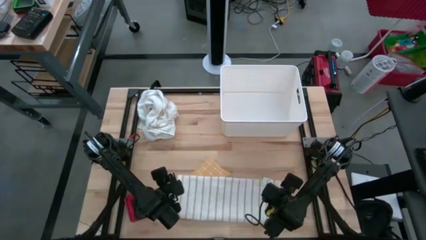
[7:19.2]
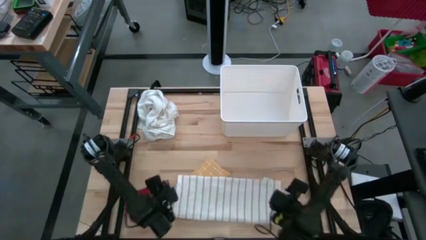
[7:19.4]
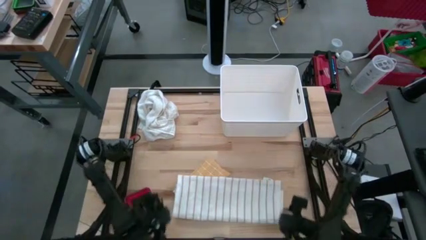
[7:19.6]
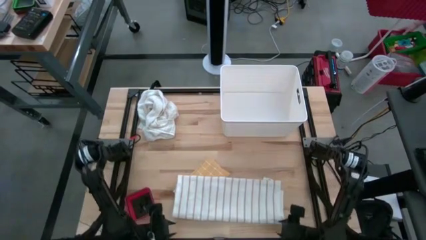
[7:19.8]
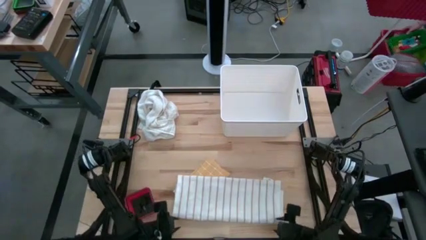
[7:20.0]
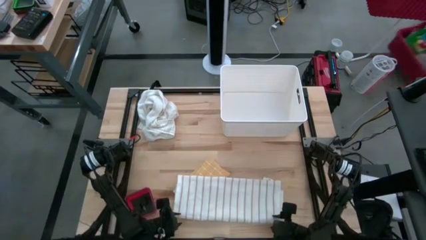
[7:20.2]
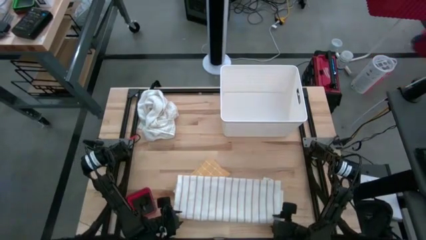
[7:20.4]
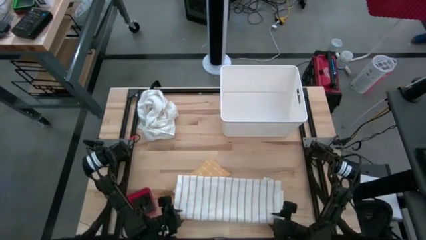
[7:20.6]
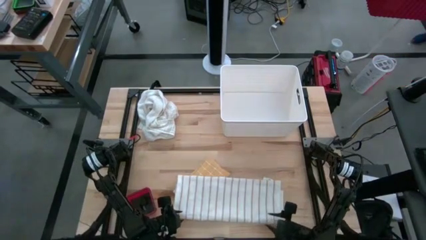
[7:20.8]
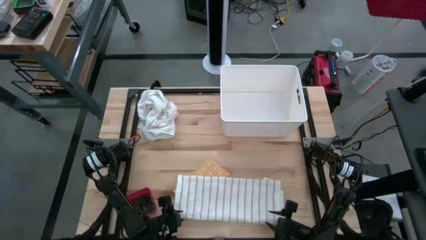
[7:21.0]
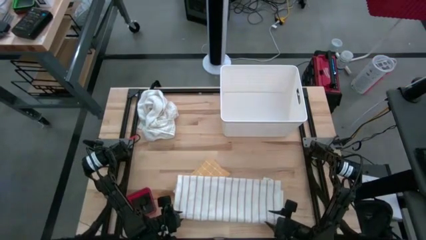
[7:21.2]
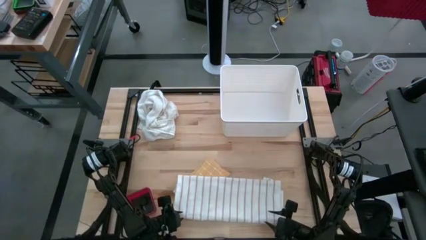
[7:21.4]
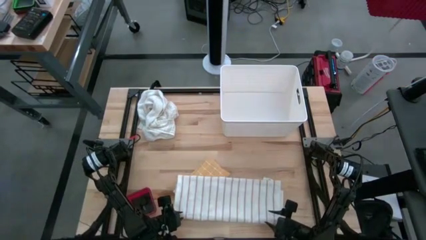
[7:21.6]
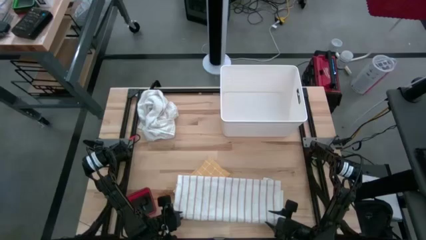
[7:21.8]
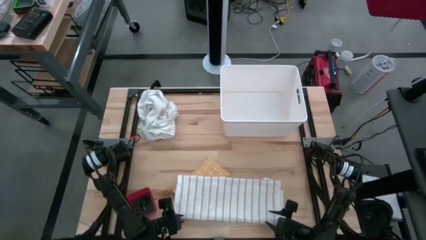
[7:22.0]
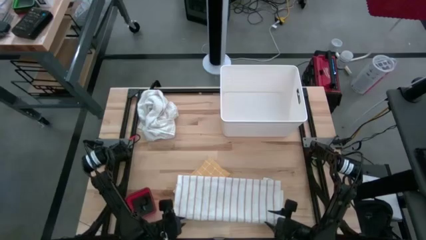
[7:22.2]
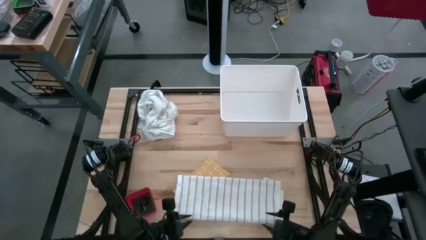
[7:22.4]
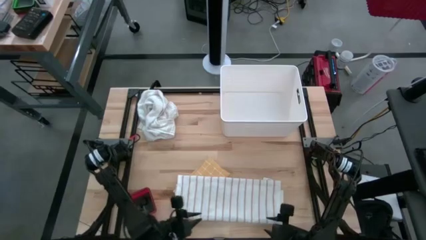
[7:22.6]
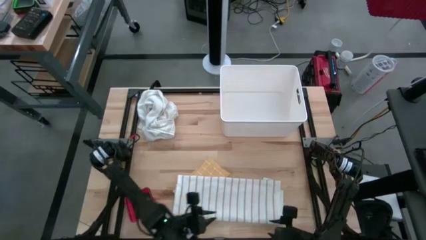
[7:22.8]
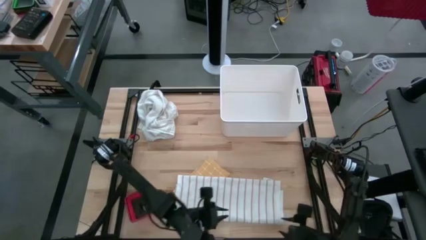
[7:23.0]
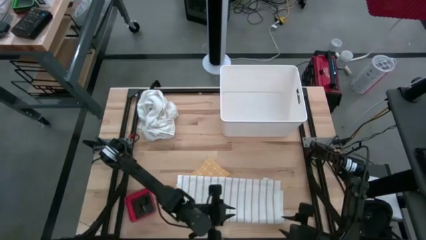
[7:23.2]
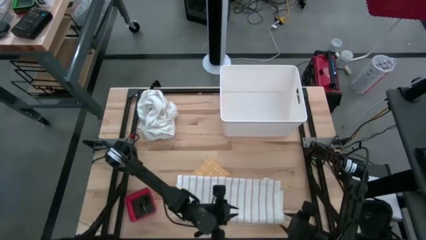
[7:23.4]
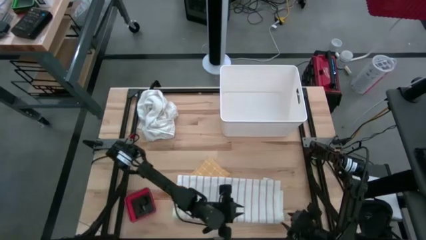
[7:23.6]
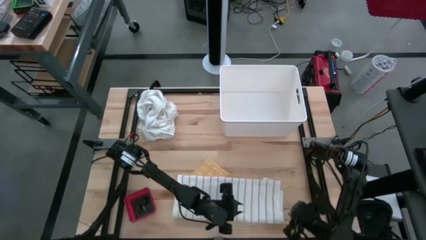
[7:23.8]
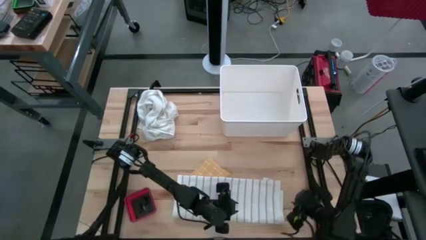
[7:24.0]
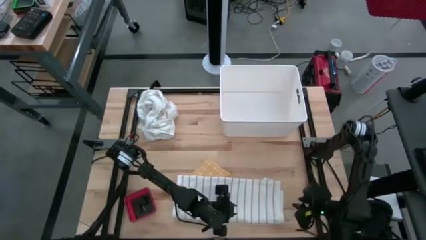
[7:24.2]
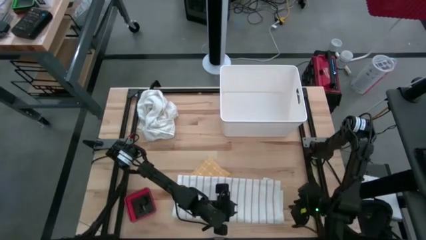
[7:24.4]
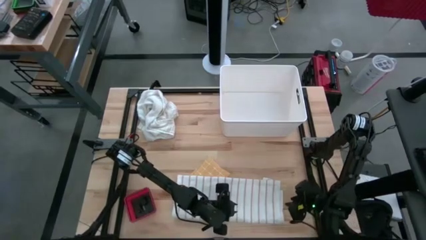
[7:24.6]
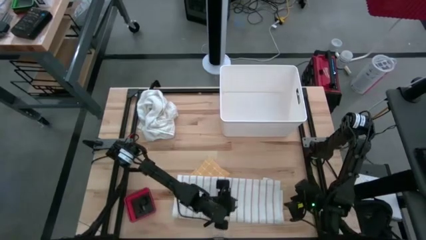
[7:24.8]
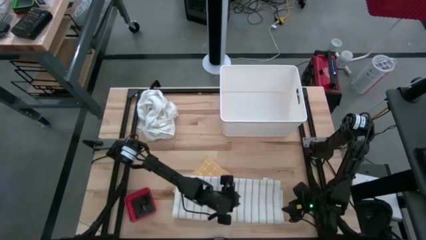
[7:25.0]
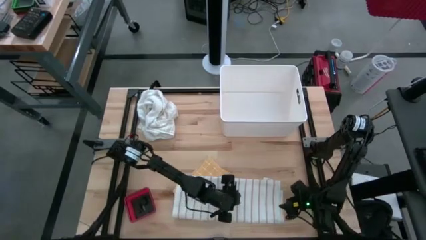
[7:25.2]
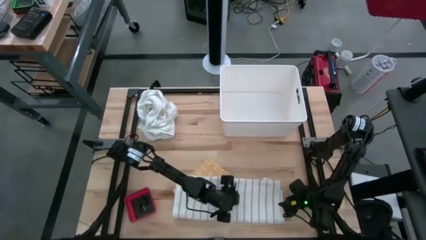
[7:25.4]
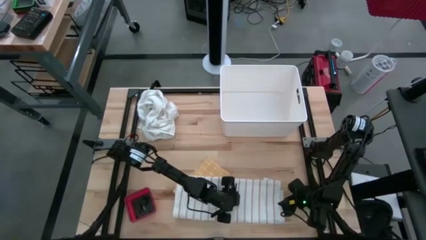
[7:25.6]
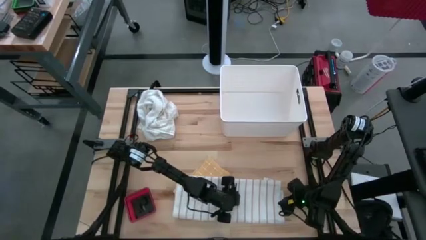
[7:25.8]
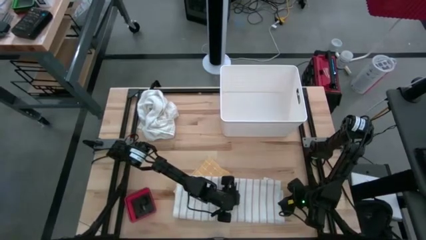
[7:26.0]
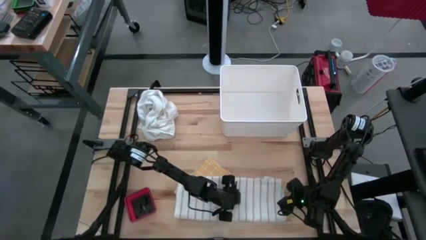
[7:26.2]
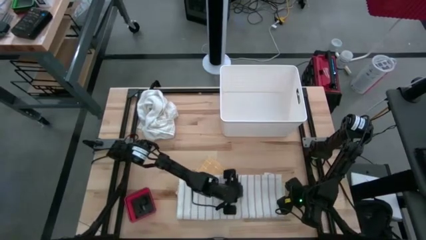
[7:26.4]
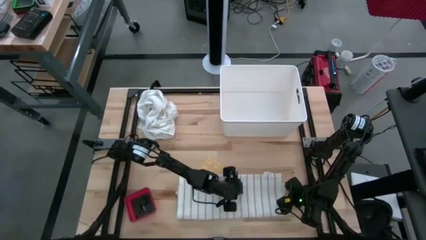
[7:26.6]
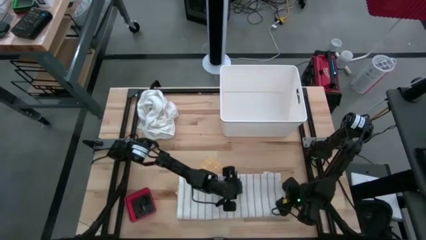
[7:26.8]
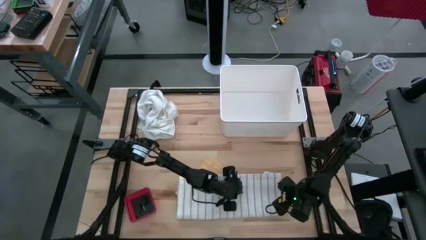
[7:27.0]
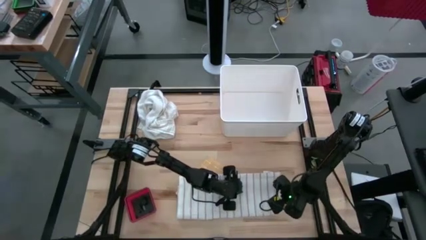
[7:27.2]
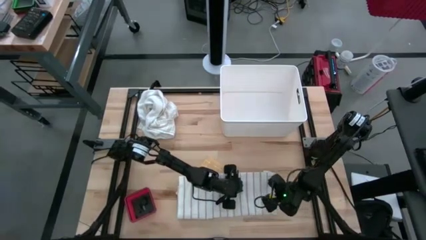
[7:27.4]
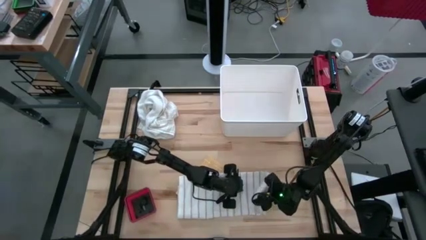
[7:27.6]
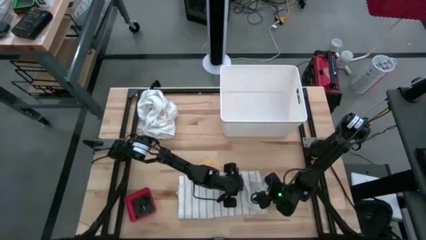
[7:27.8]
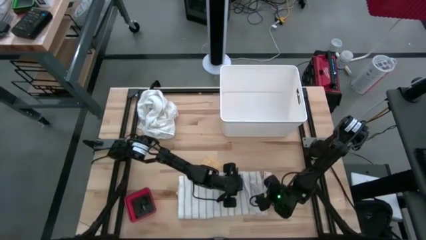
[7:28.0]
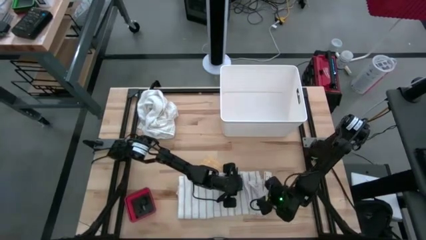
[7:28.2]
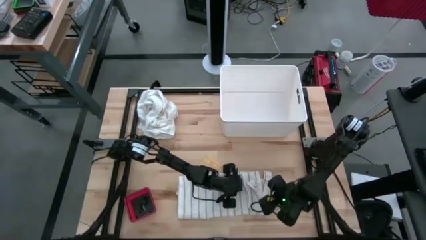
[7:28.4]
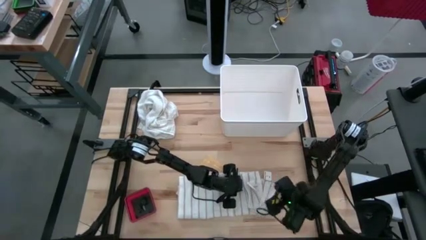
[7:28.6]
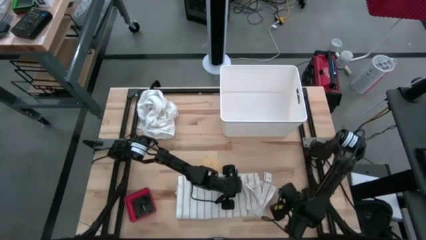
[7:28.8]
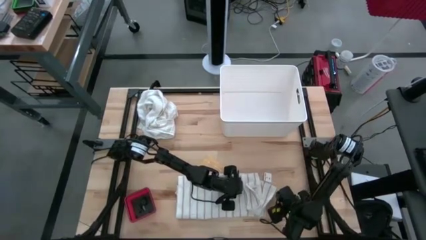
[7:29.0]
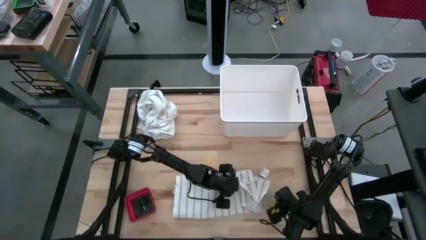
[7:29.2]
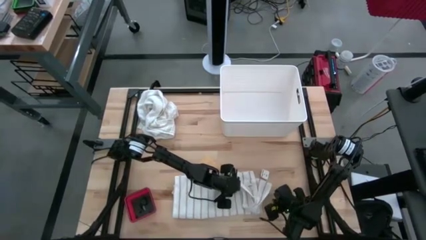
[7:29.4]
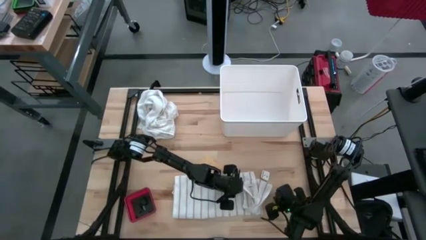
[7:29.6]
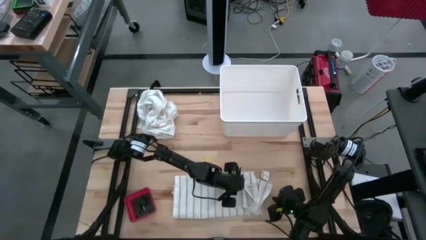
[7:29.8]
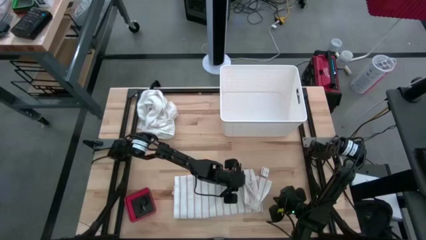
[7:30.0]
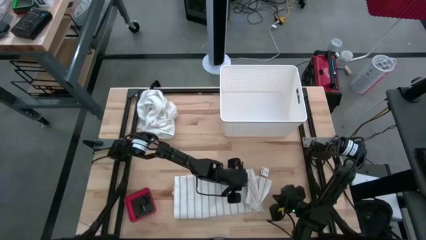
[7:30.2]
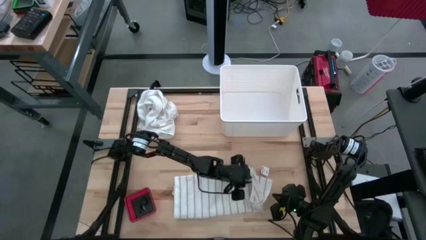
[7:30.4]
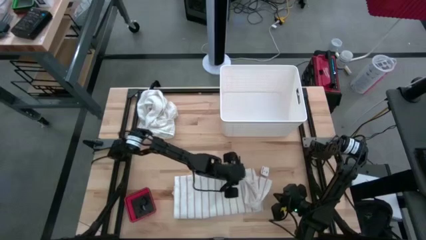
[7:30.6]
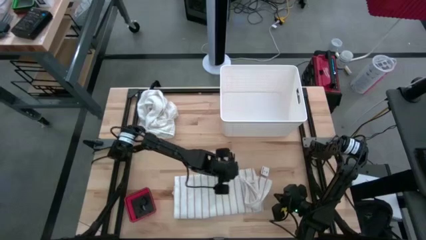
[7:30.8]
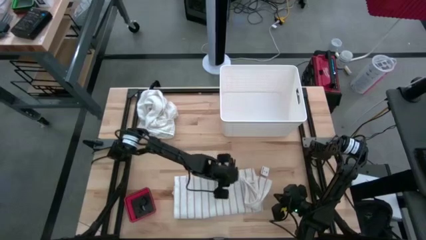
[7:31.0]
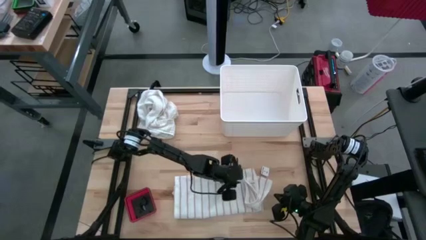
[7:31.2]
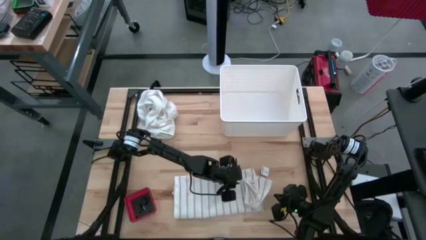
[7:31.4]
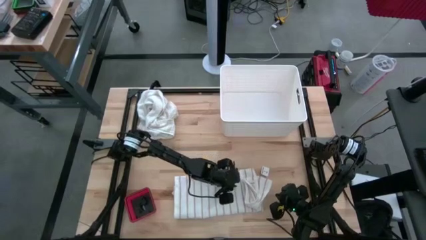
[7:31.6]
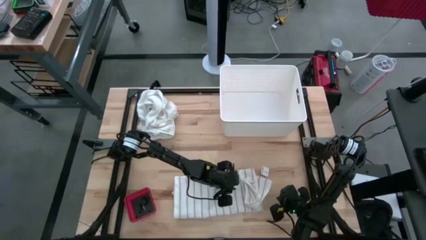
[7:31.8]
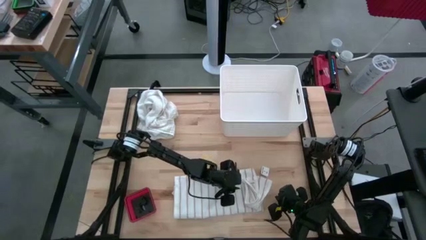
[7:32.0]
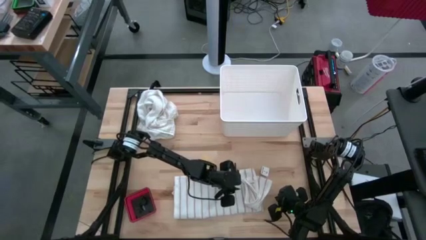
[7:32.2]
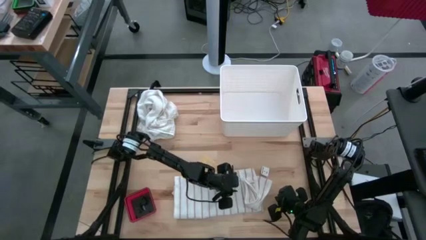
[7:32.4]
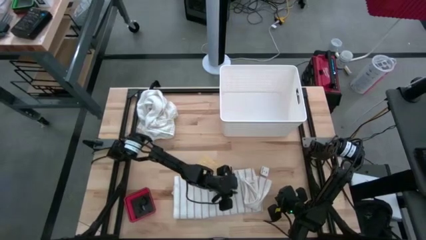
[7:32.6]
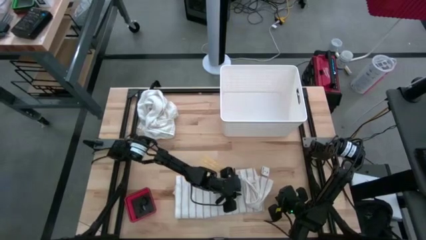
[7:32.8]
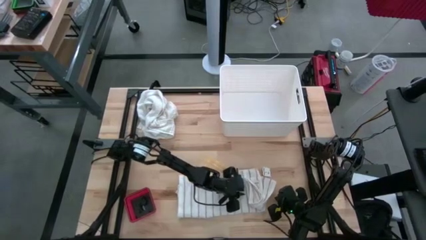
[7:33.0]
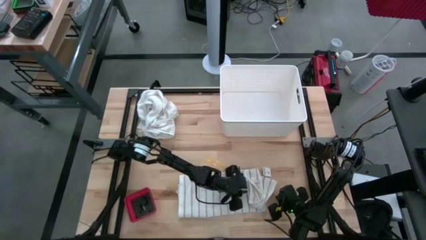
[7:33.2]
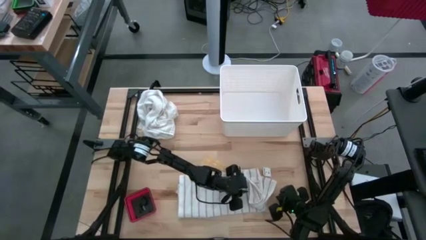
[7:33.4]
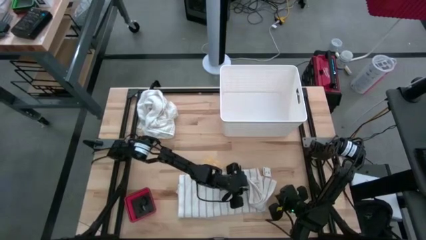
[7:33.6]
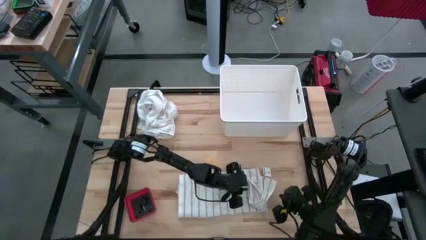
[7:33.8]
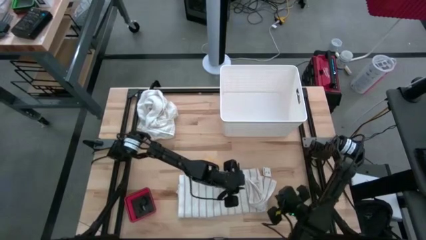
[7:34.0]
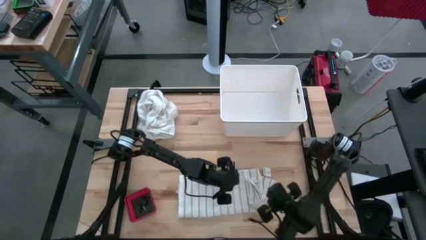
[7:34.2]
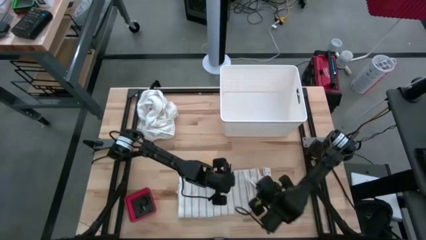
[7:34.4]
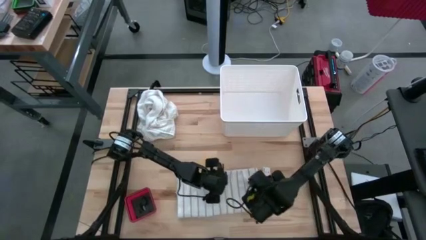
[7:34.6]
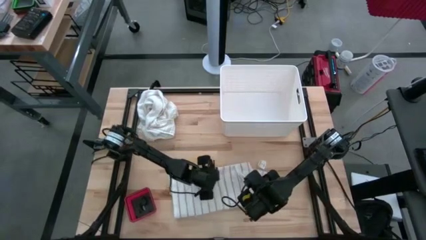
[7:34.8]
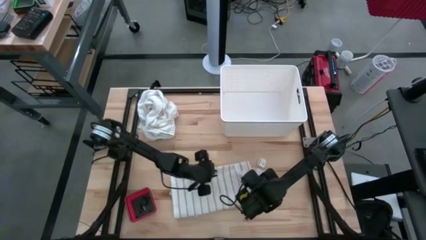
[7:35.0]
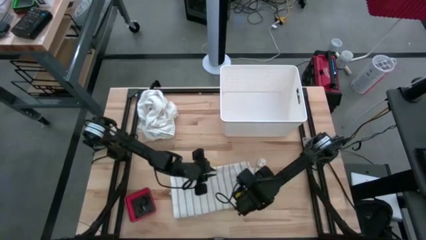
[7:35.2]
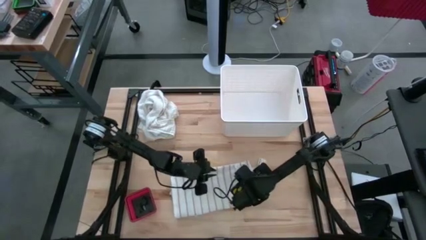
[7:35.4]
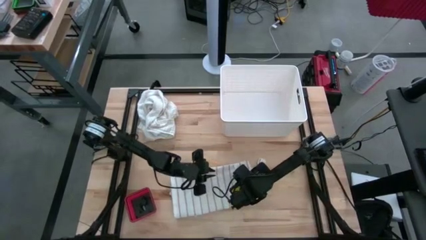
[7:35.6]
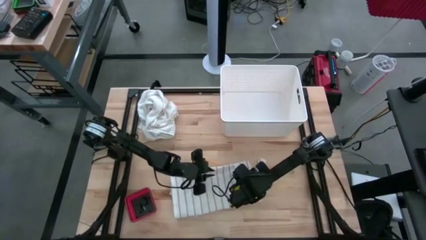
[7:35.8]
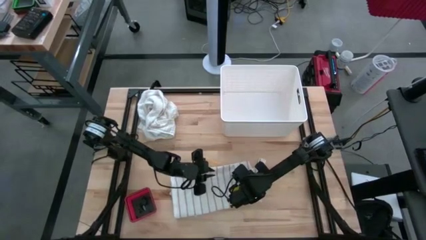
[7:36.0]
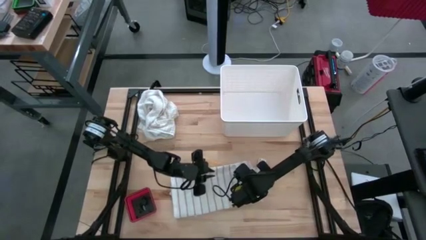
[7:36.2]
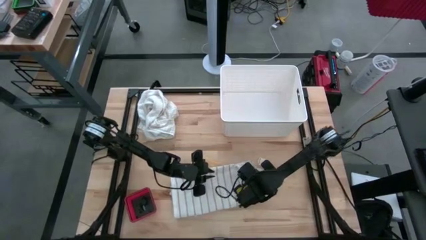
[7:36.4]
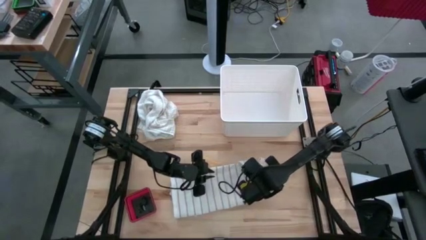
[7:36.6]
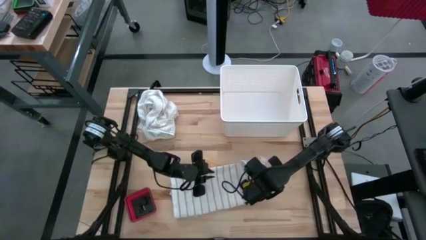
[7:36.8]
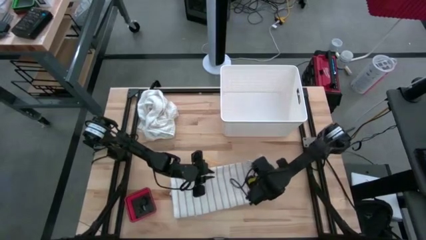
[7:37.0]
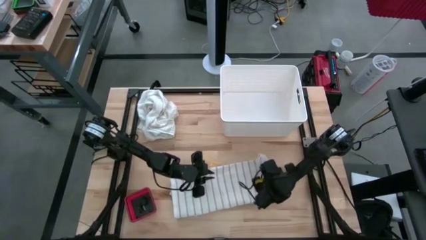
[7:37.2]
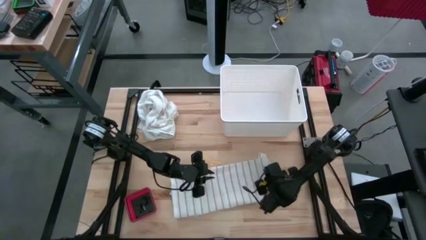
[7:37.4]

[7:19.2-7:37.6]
Task: Fold towel
Fold the white kitchen towel
